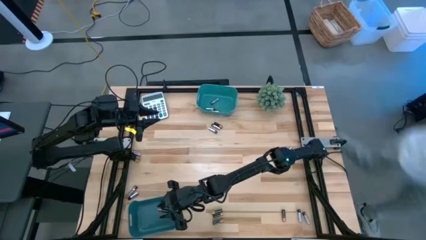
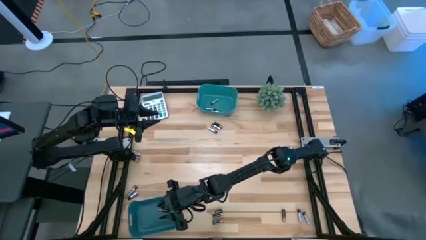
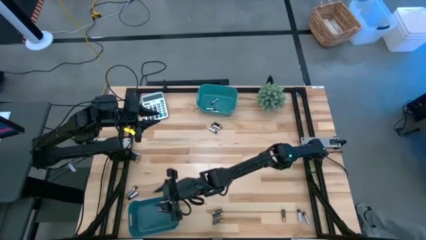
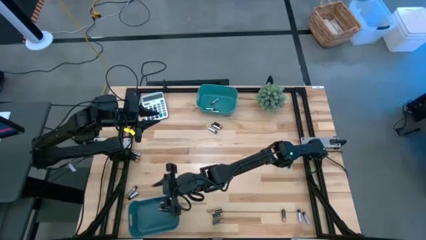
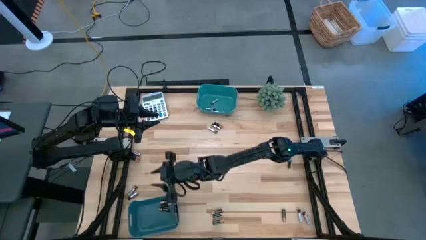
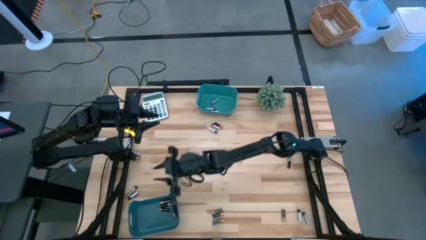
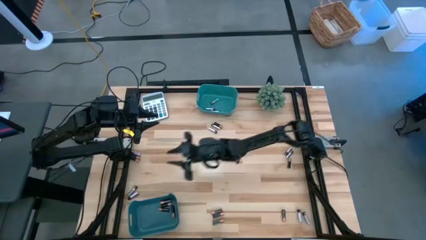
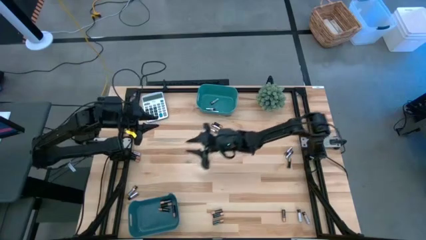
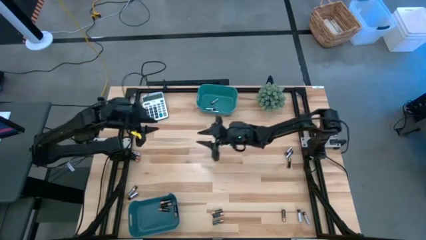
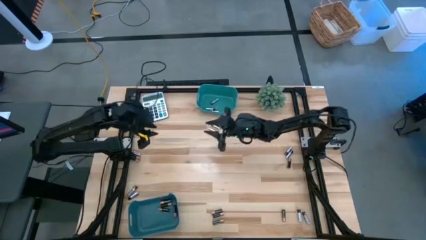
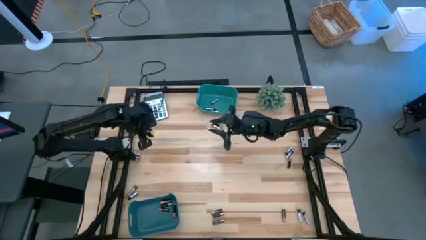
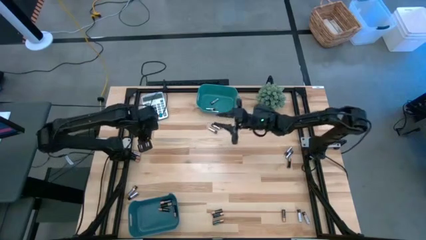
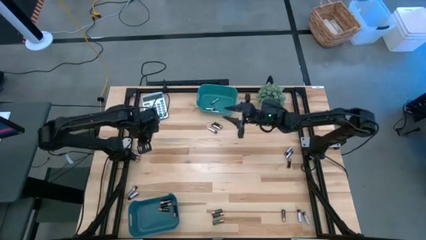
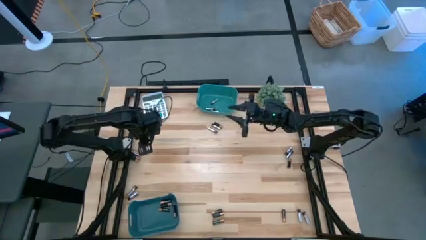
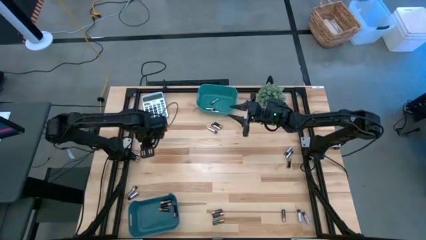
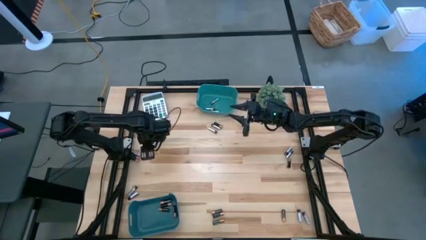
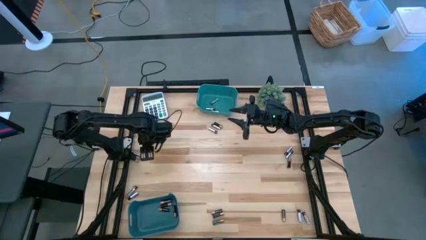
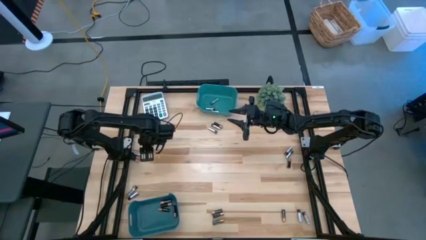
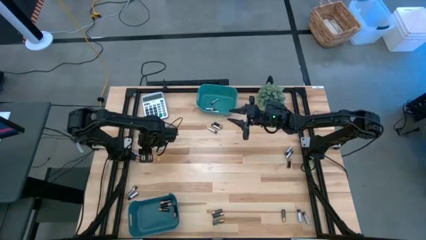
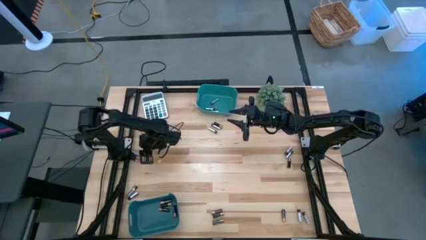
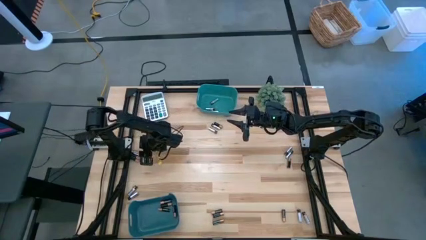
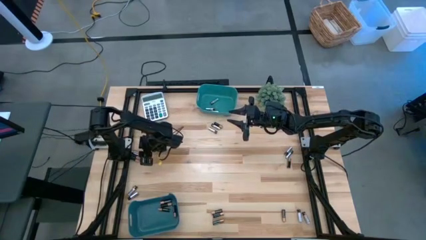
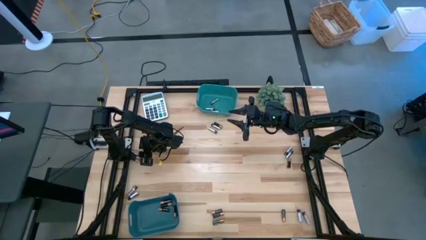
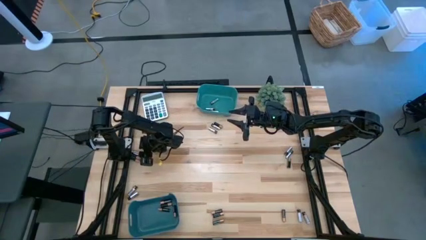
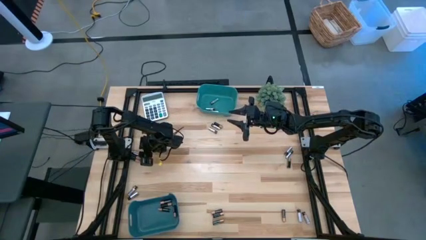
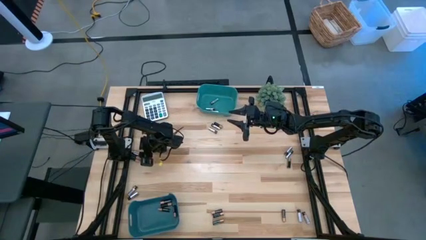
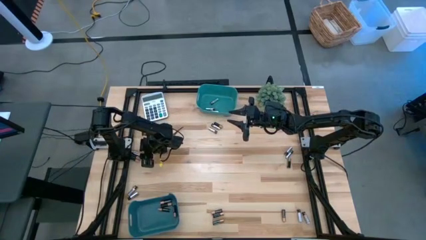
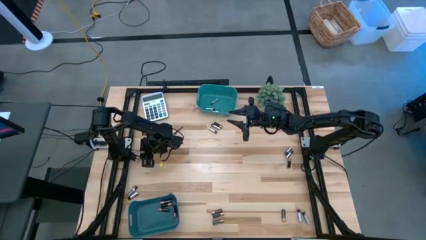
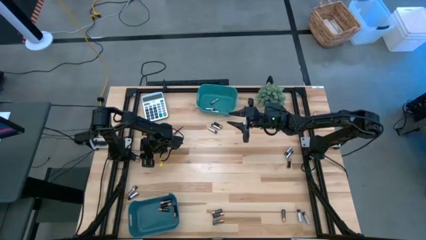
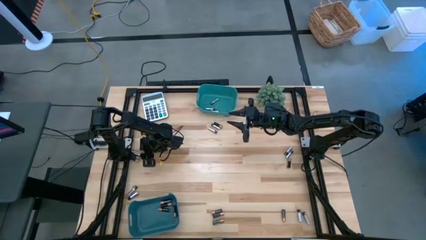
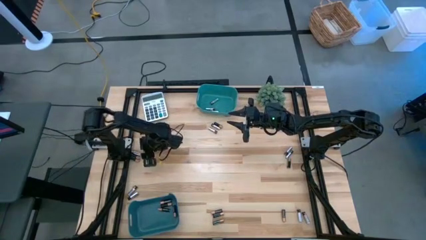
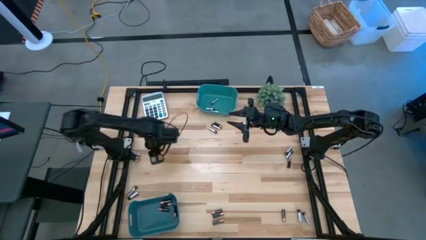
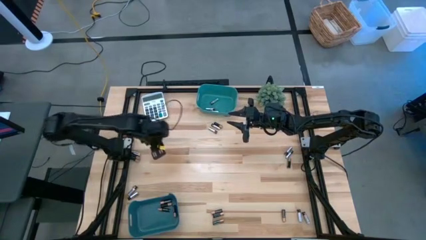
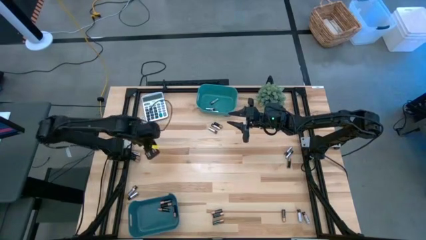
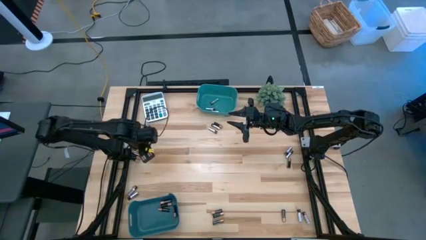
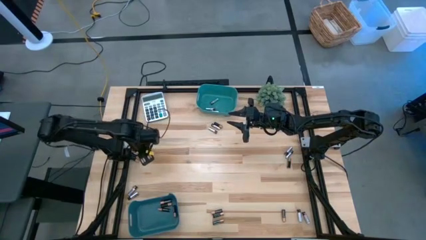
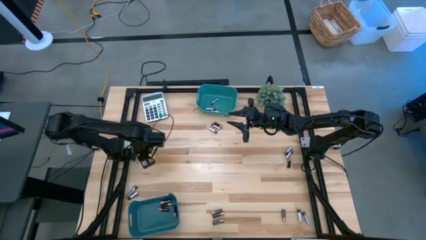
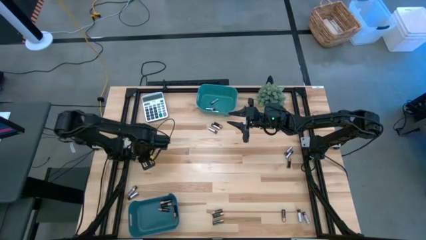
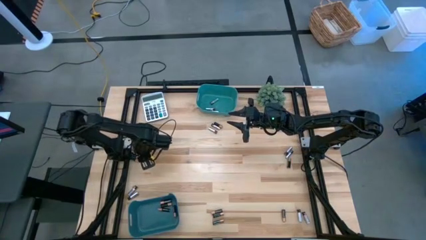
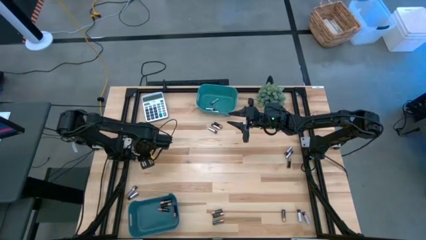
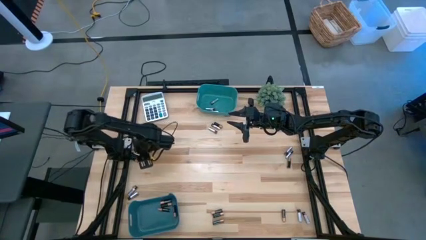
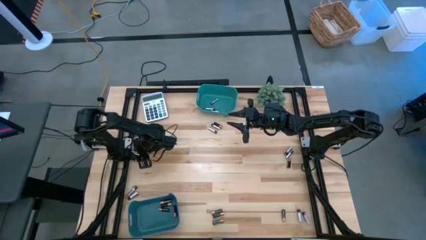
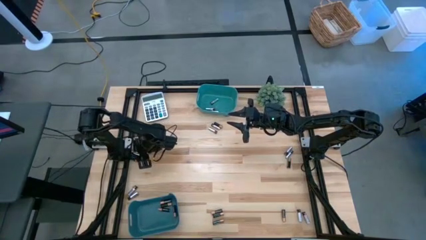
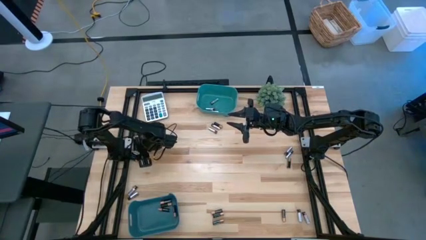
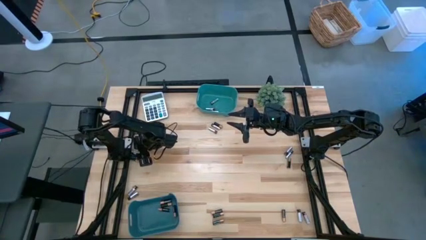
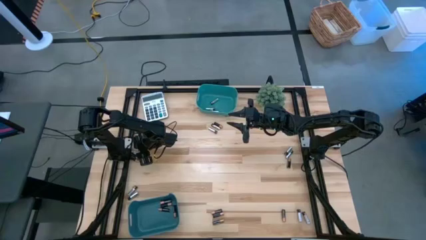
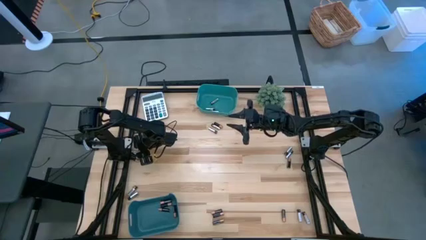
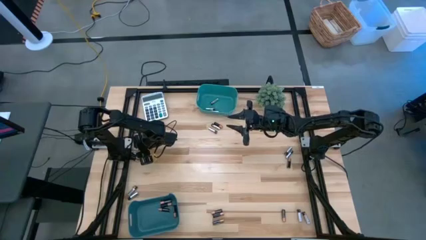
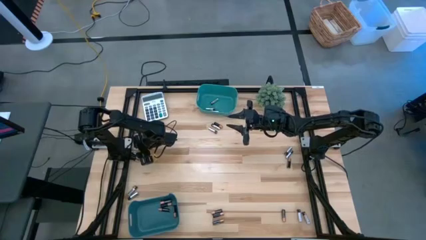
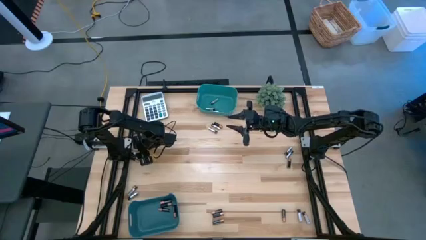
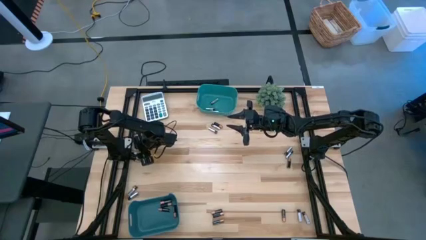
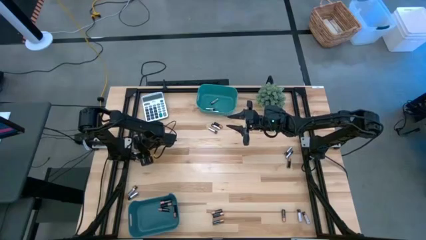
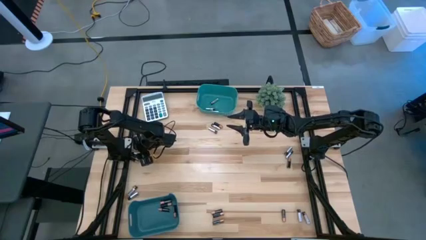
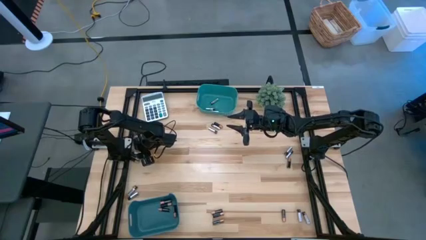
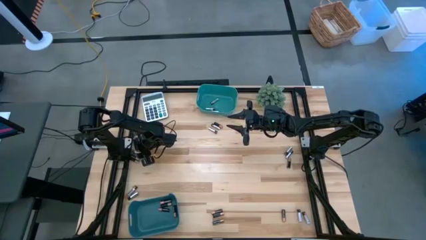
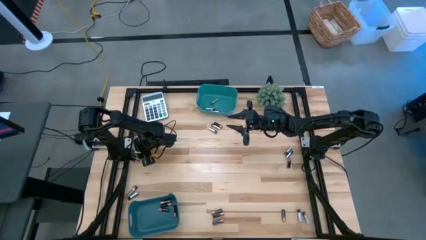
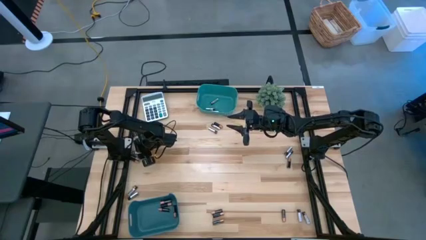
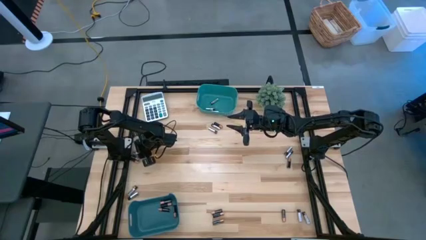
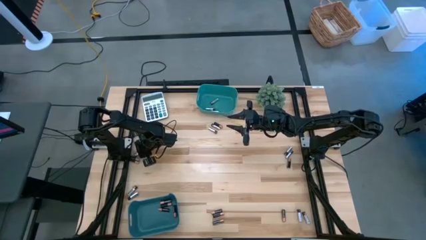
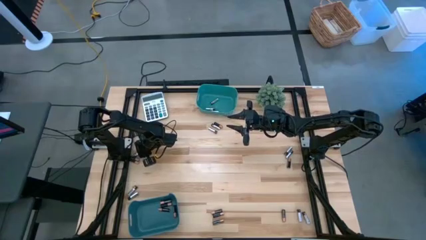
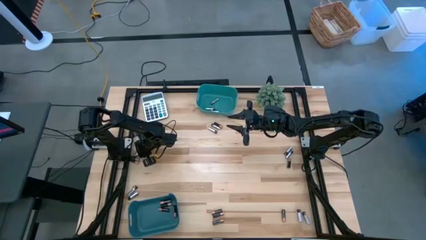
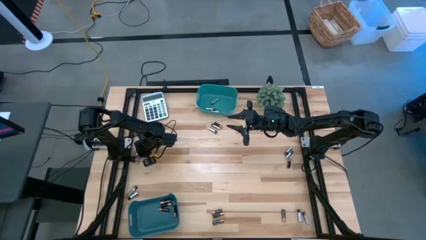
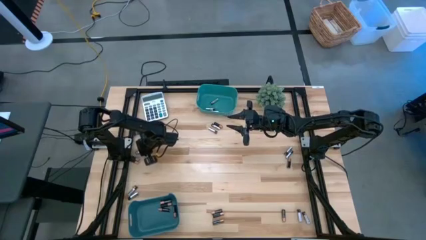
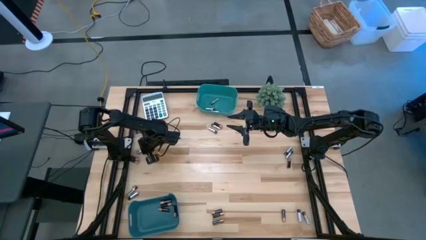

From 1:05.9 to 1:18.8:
Task: Sort batteries
Put the silver battery into the top green bin

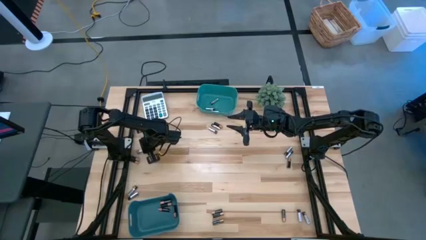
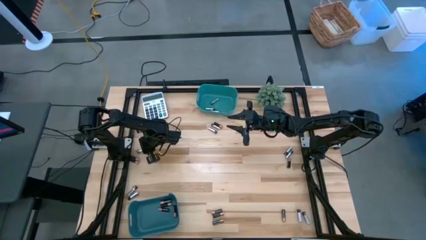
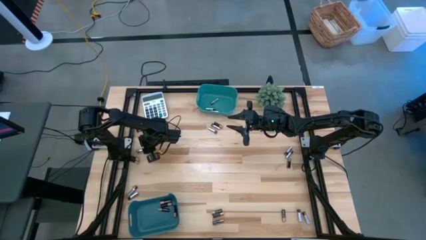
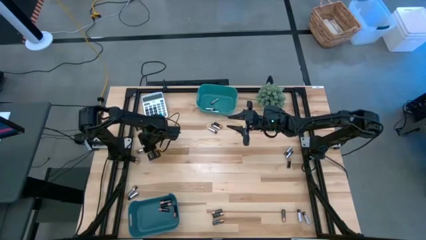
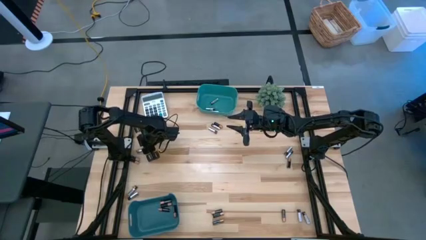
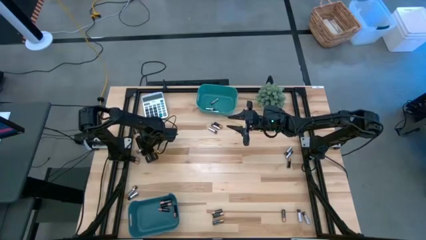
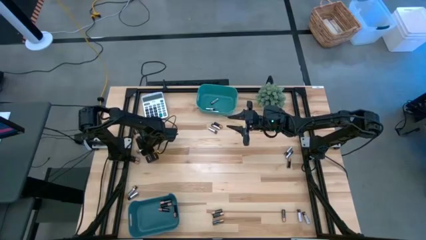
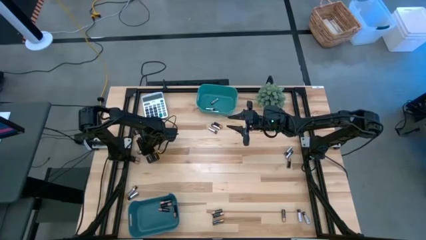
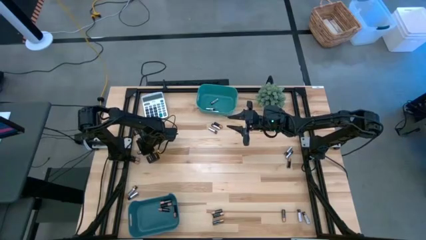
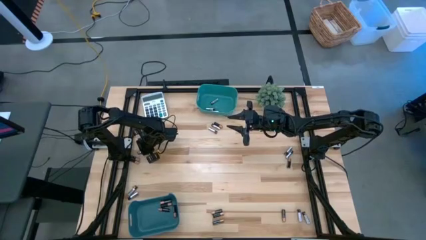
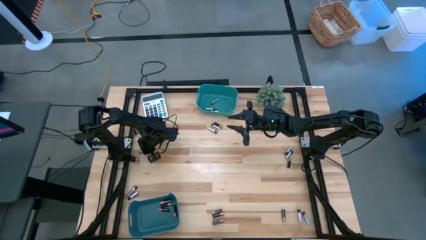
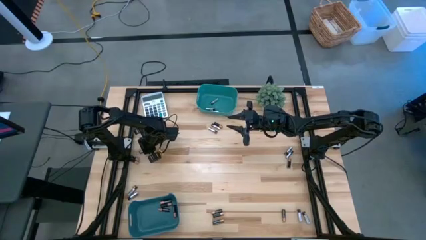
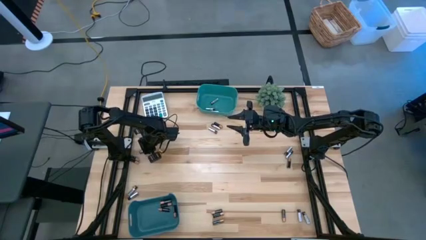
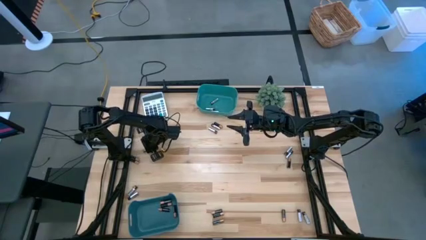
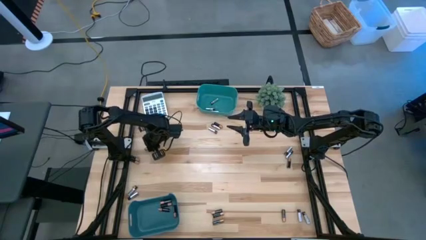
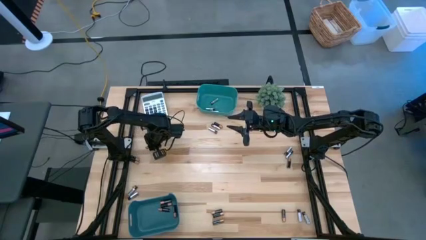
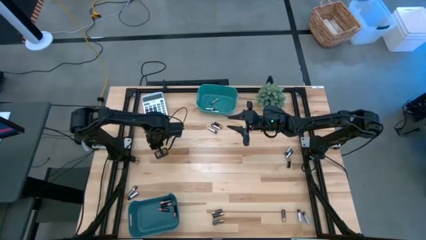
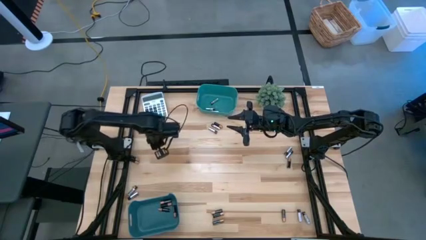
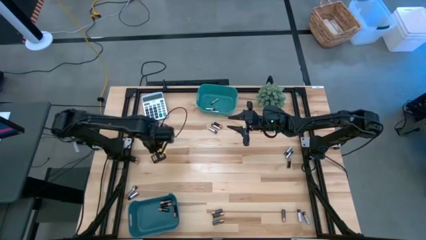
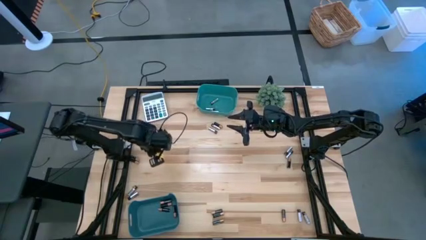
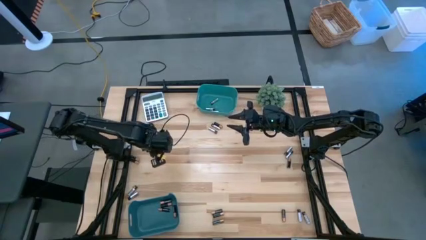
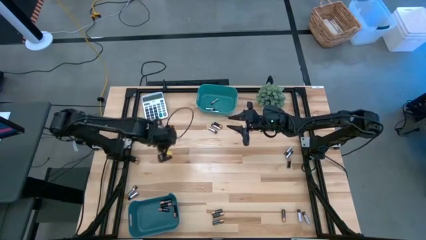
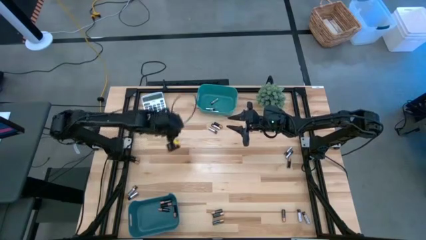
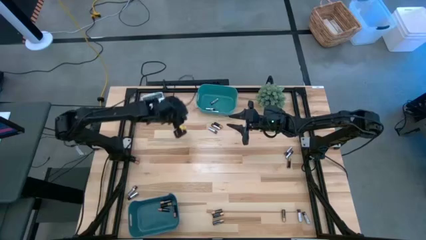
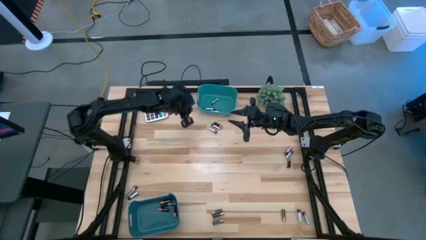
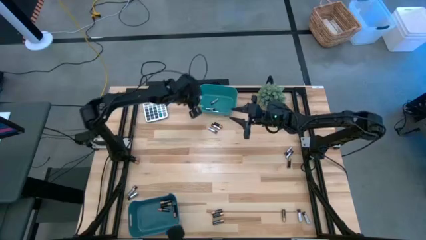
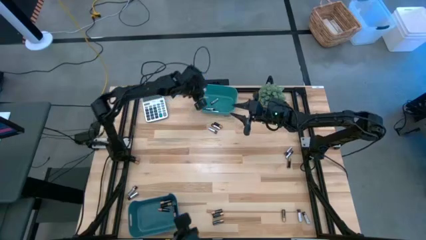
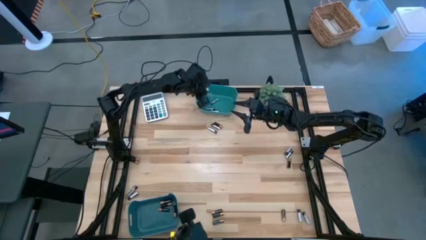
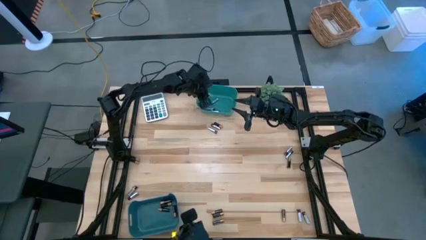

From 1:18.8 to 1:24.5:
Put the middle right silver battery into the top green bin
